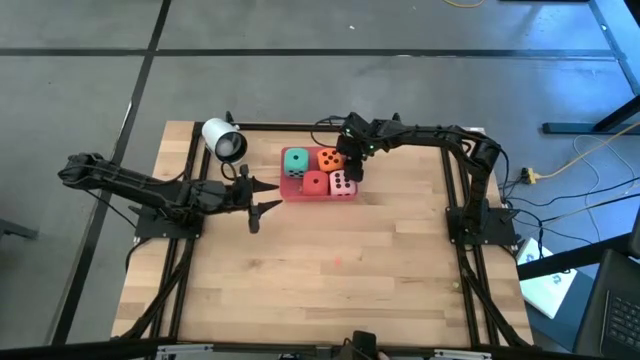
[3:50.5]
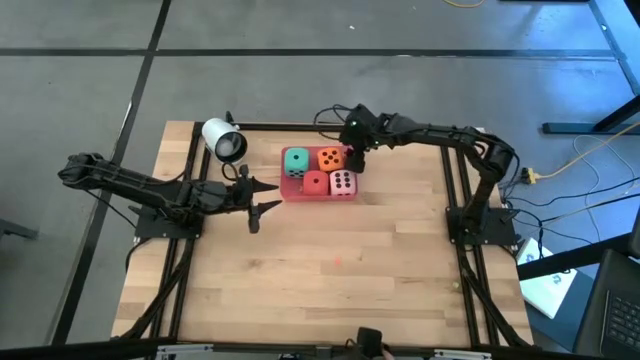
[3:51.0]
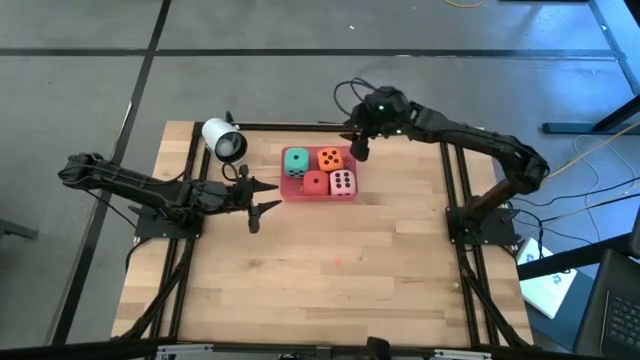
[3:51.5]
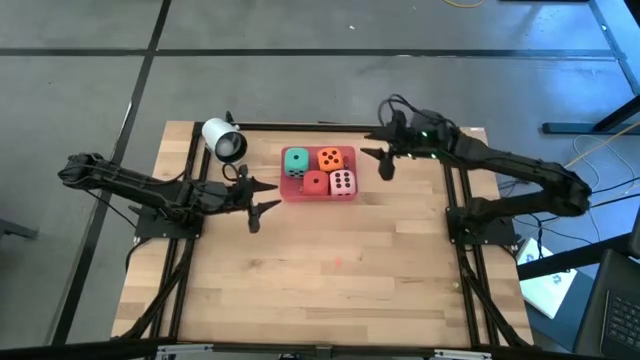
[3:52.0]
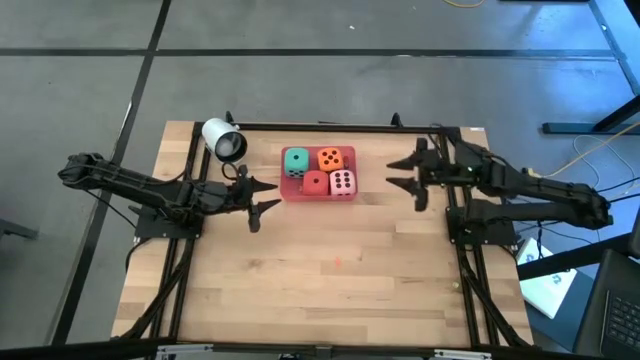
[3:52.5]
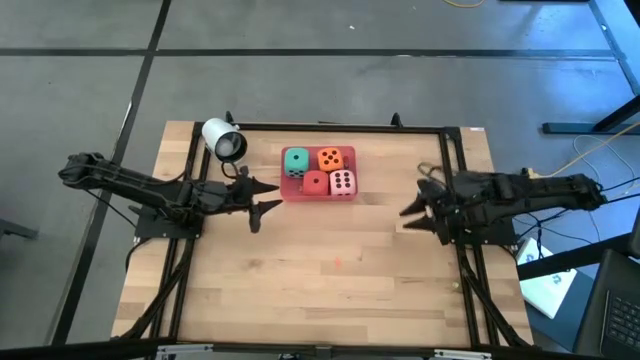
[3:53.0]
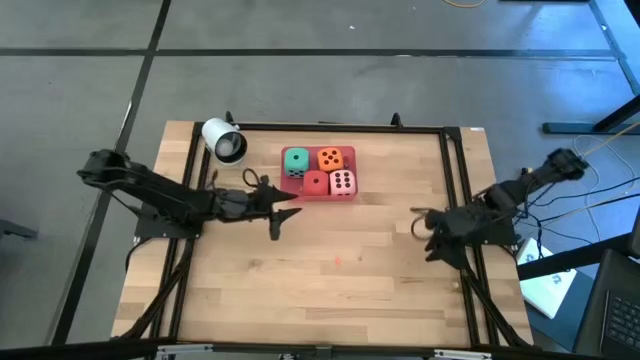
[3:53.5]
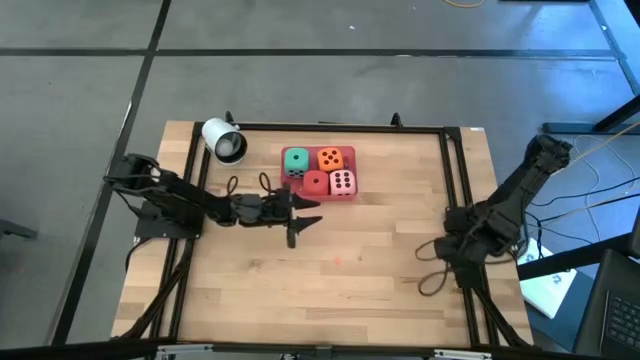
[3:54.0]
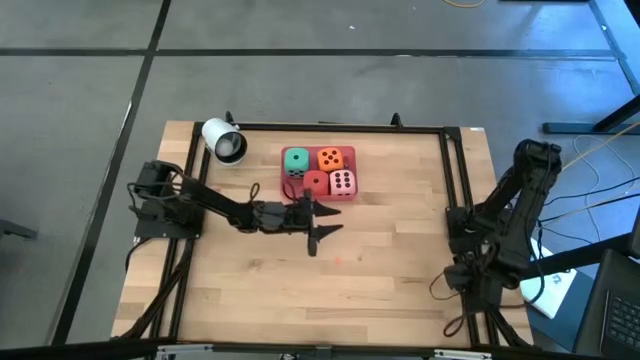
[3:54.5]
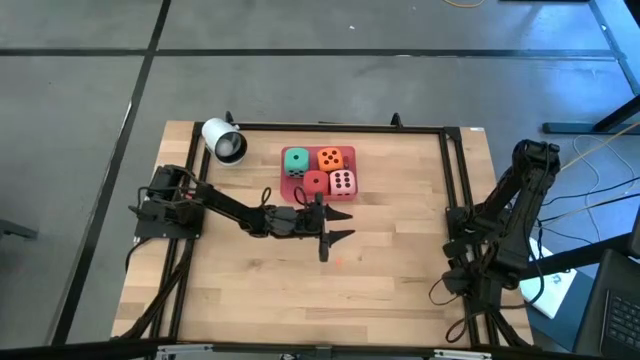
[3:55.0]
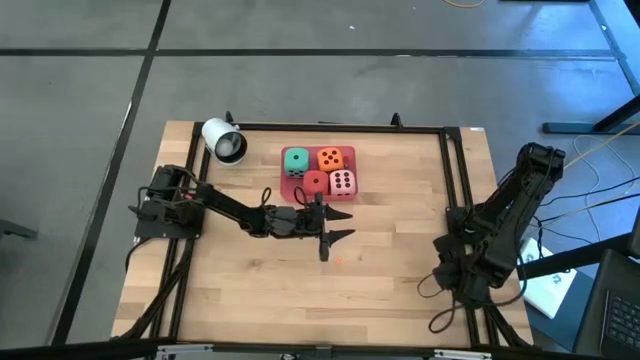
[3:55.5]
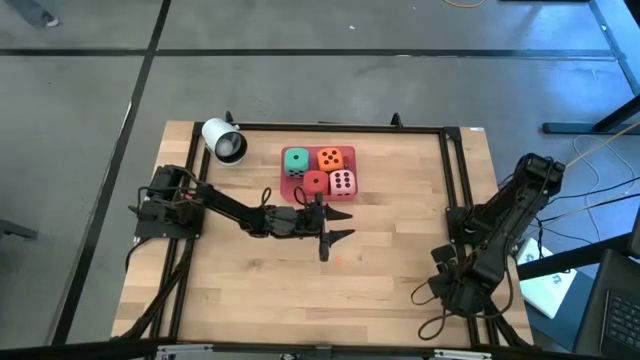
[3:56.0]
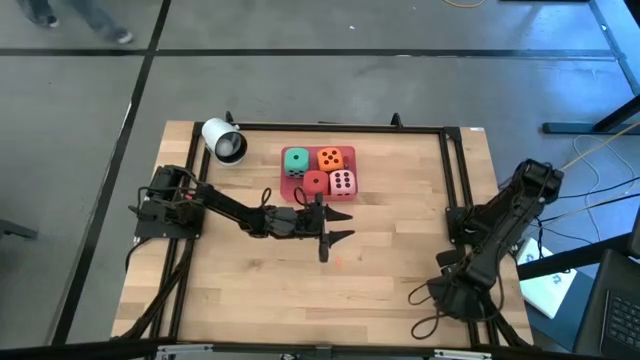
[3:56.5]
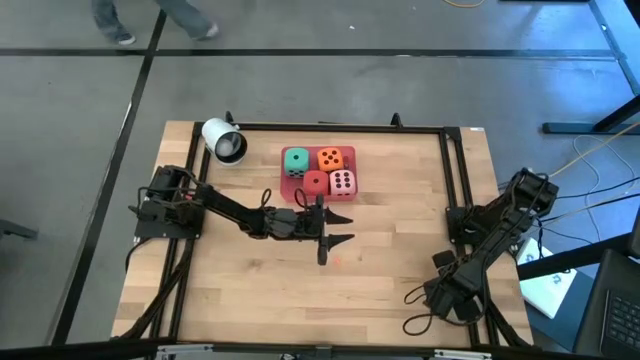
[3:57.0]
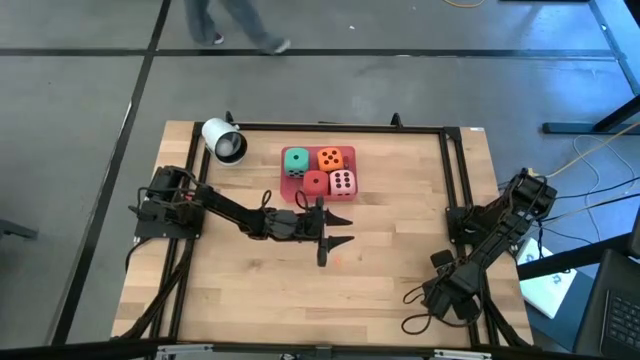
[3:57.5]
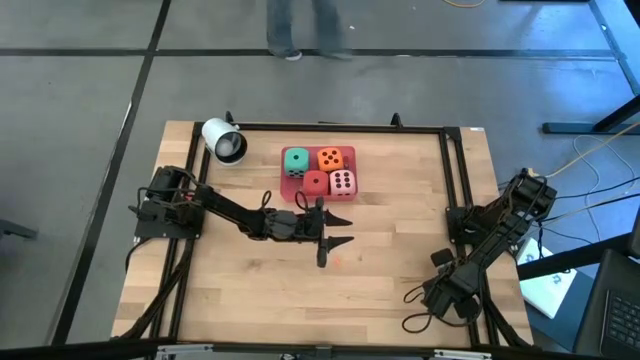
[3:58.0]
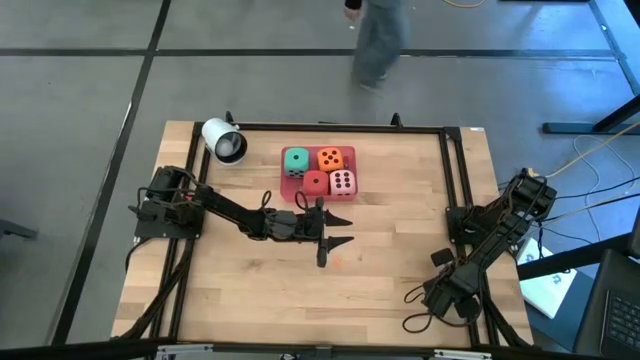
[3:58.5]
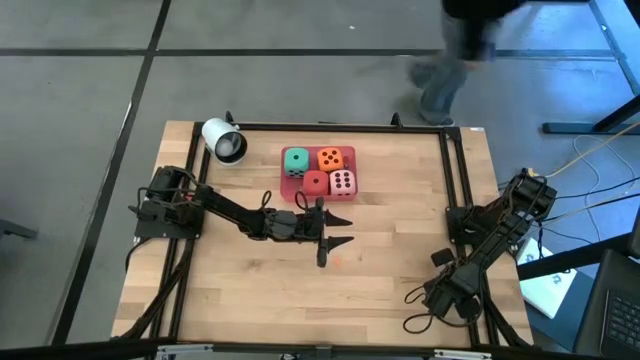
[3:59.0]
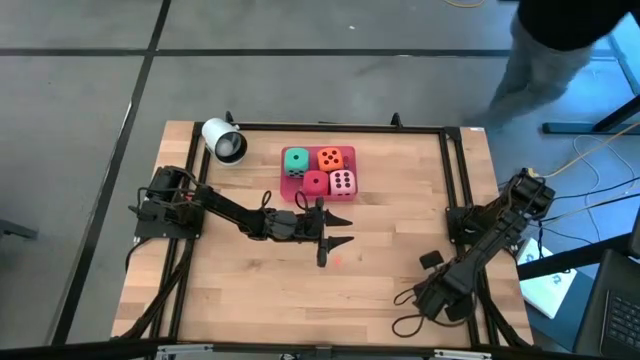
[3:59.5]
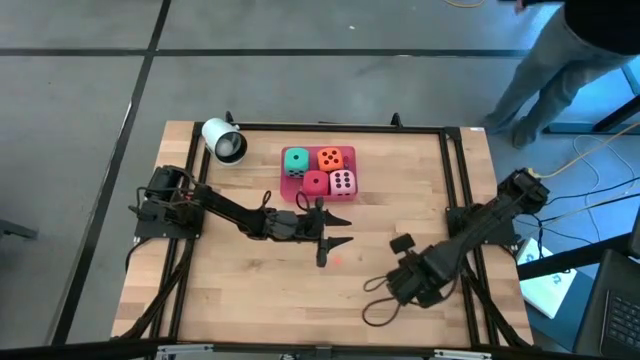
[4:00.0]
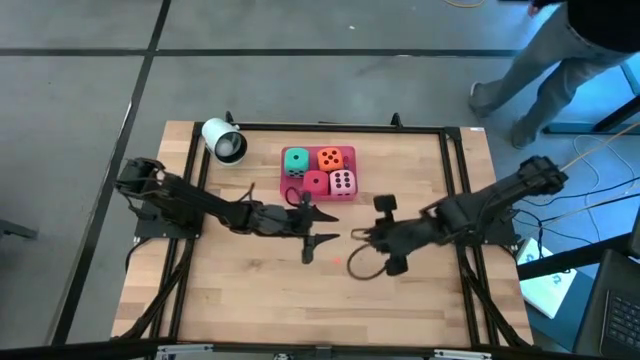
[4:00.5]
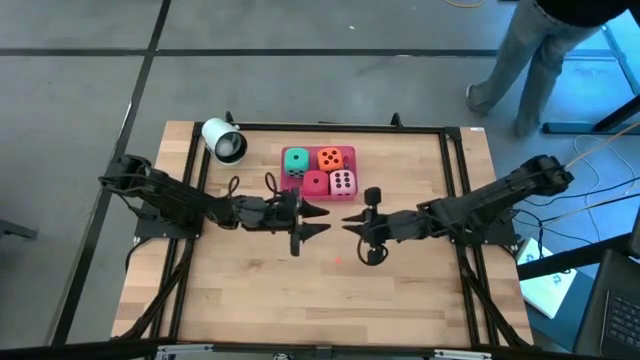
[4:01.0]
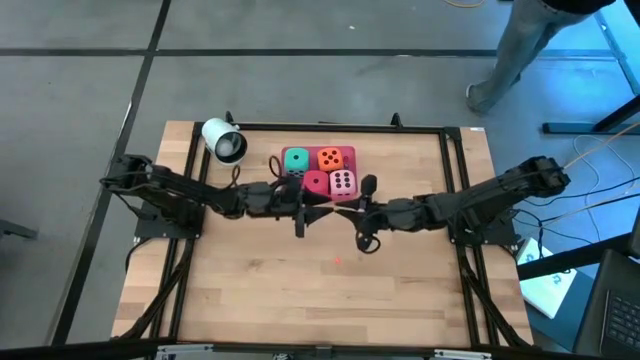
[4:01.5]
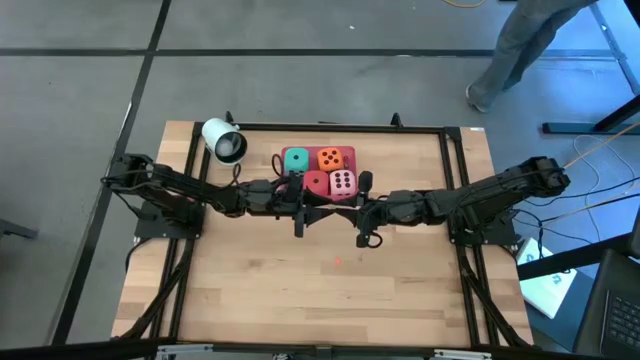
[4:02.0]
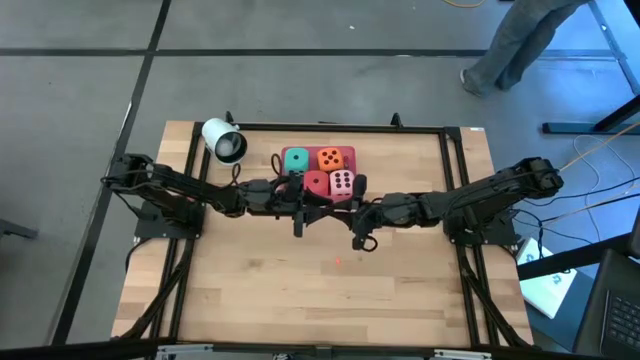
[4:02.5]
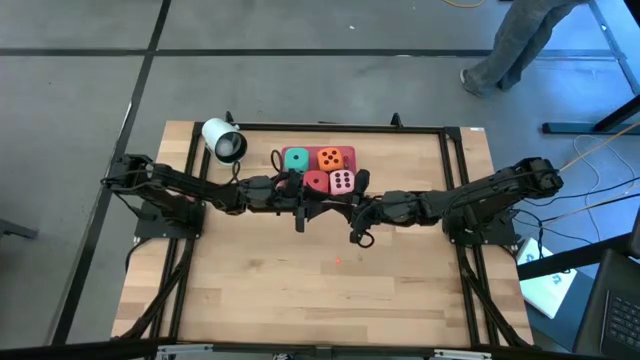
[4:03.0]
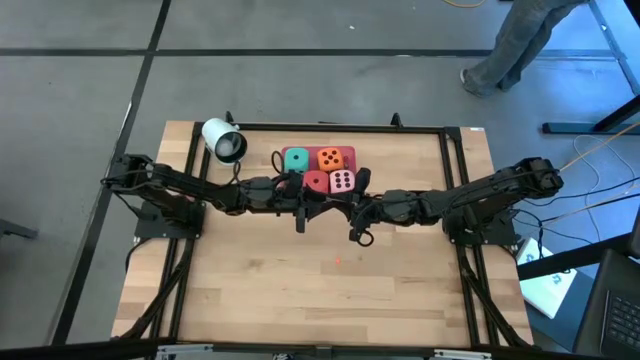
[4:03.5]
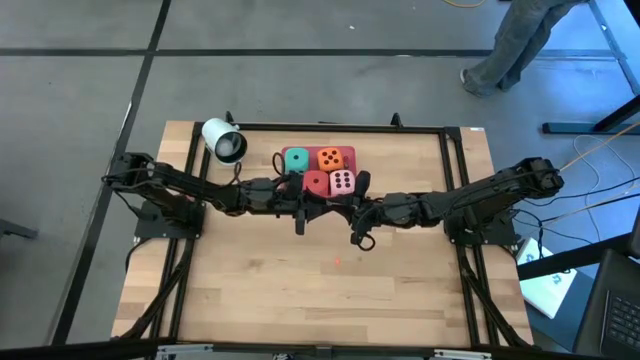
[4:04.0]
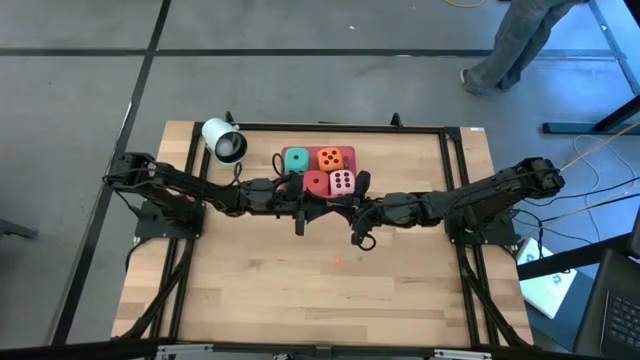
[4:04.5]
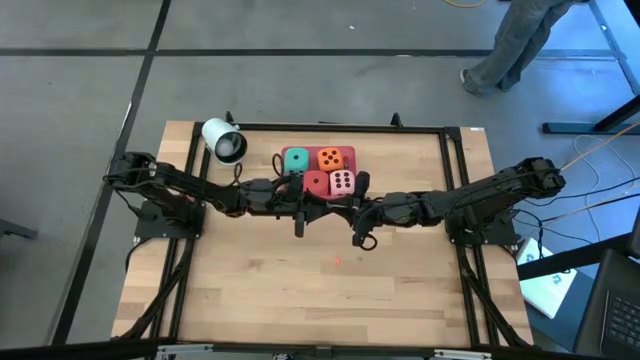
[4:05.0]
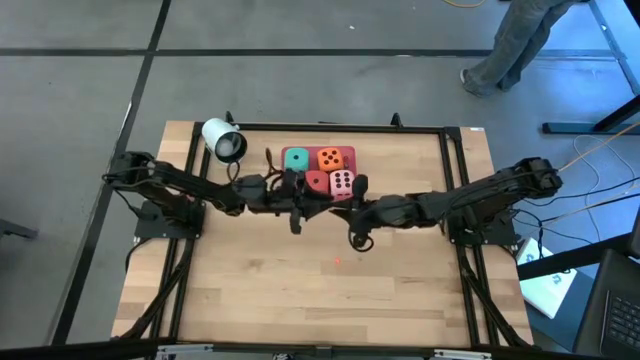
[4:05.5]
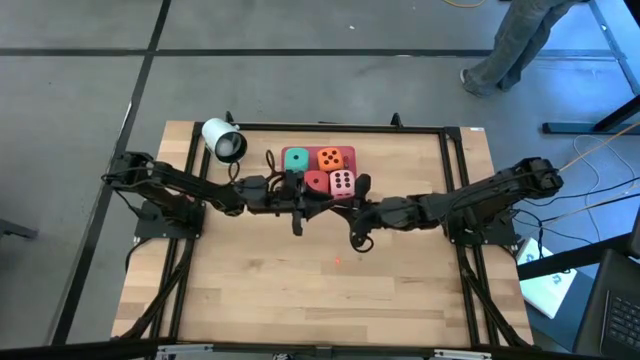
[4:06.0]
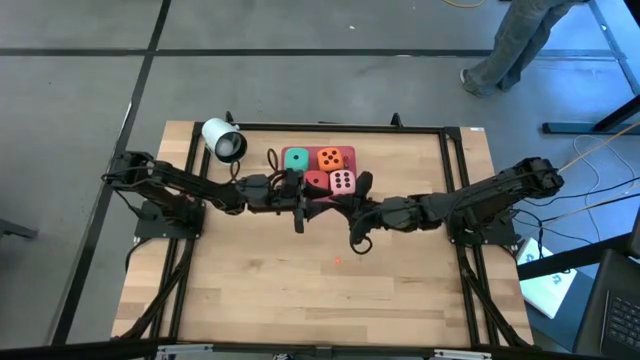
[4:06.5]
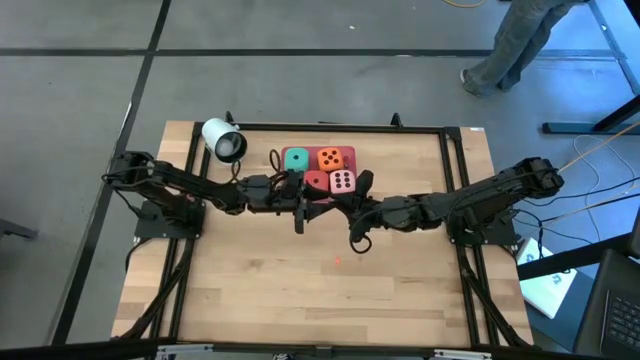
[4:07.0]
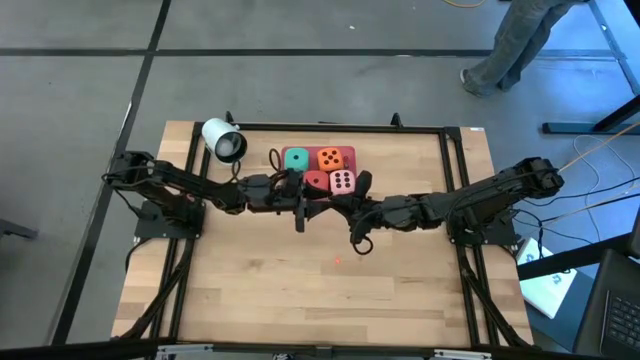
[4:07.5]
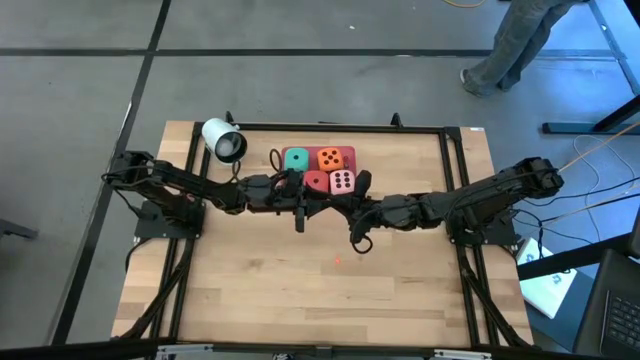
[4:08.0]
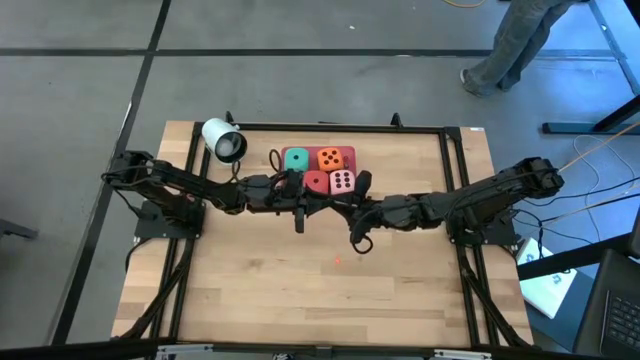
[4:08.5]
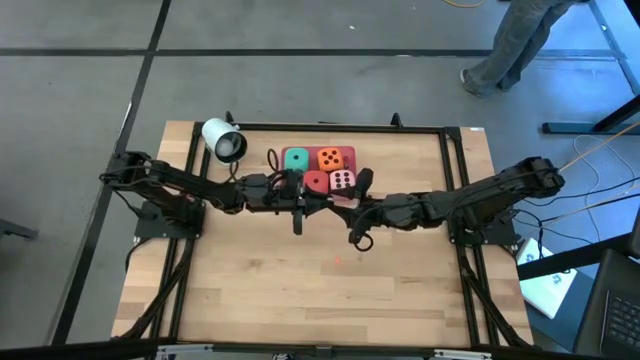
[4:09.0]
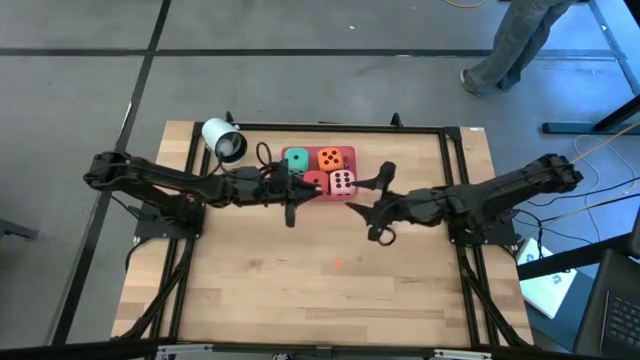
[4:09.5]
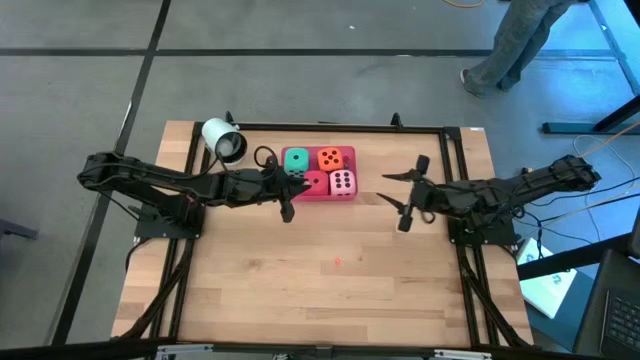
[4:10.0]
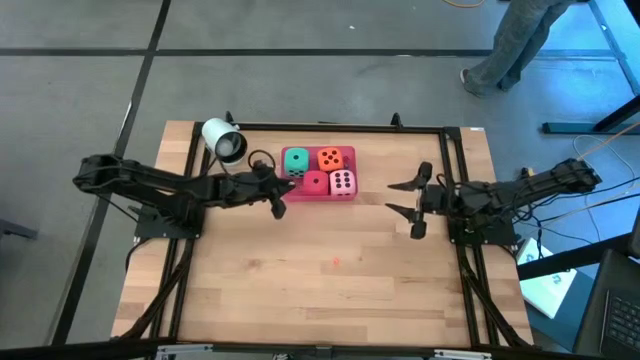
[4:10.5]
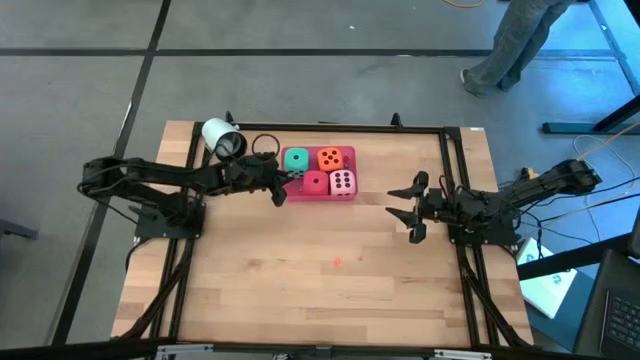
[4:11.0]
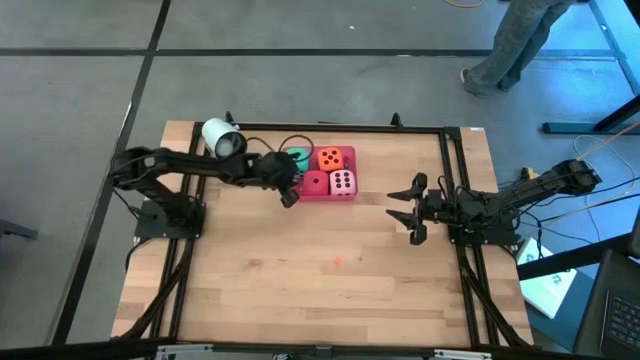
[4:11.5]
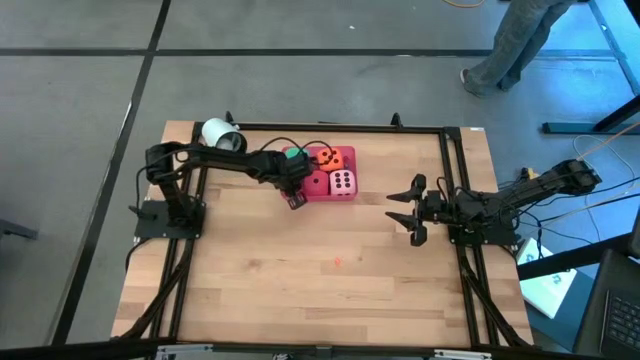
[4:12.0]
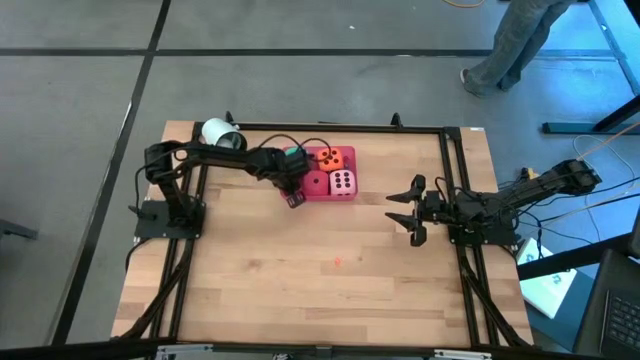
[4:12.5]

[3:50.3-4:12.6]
Task: Pick & Place Dice
Put the small transparent dice into the pink bin
